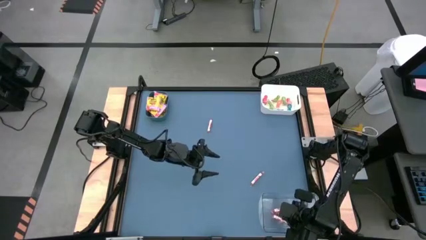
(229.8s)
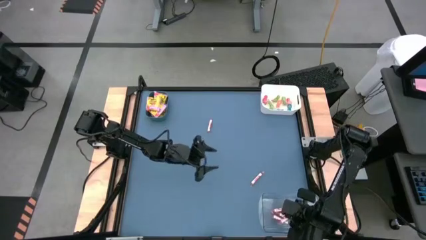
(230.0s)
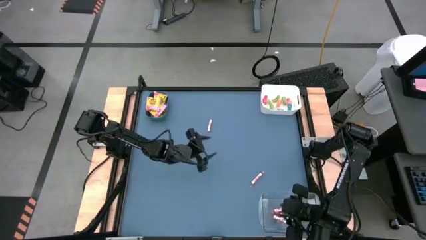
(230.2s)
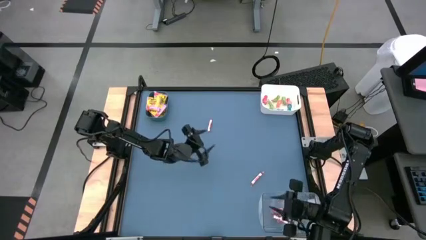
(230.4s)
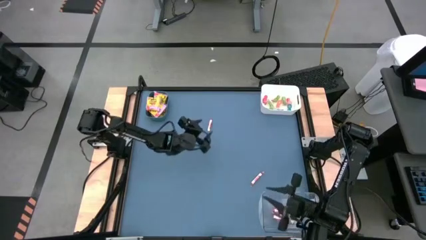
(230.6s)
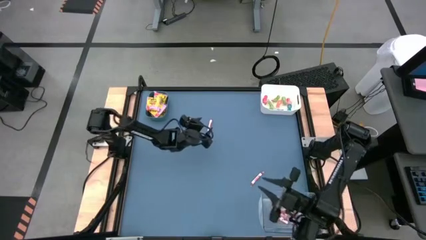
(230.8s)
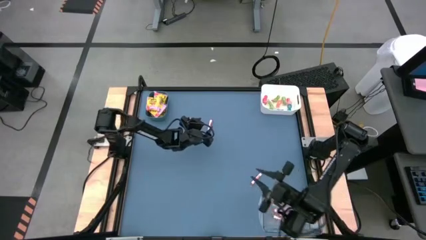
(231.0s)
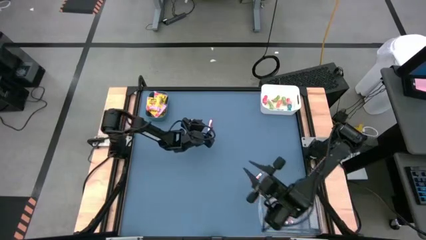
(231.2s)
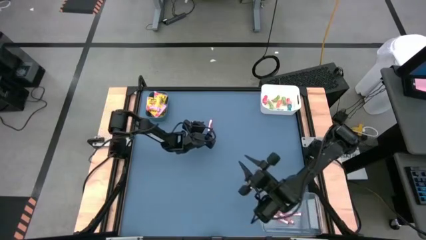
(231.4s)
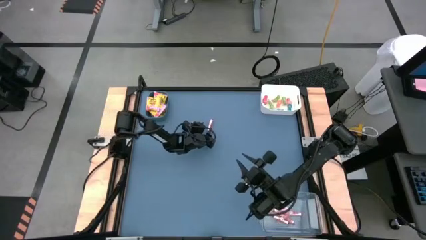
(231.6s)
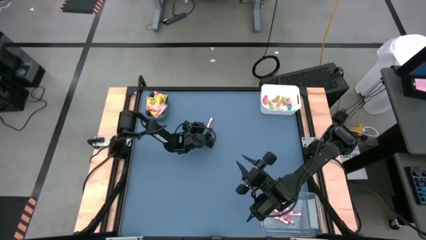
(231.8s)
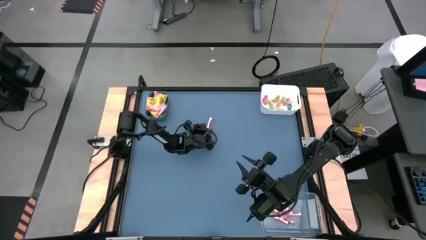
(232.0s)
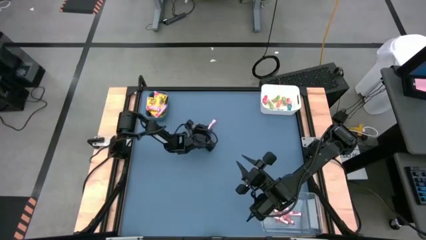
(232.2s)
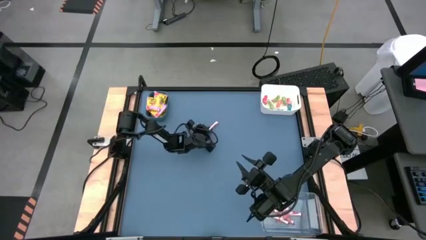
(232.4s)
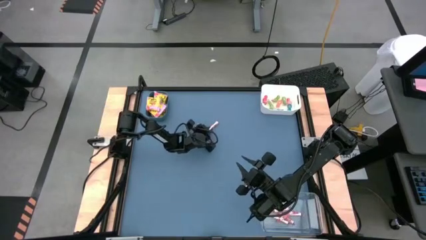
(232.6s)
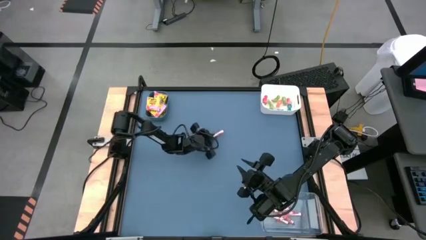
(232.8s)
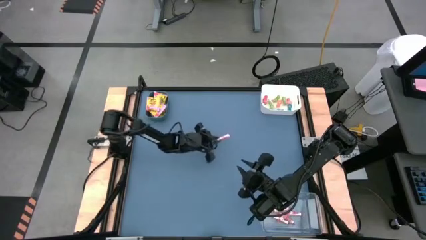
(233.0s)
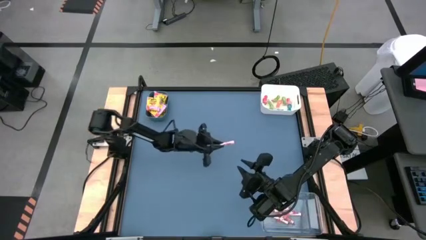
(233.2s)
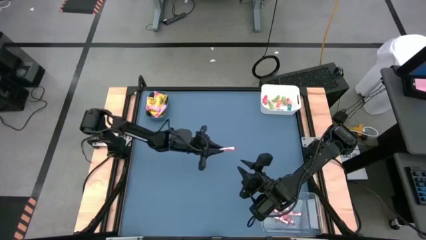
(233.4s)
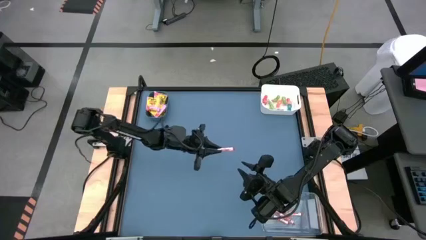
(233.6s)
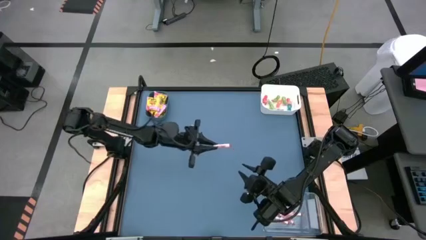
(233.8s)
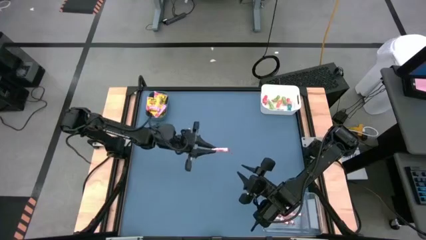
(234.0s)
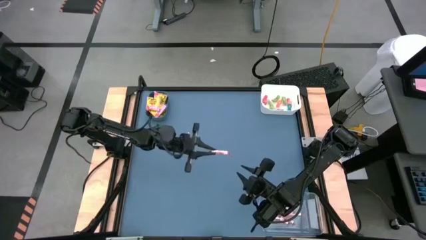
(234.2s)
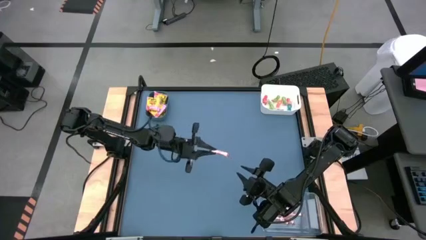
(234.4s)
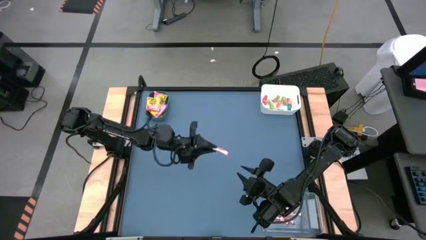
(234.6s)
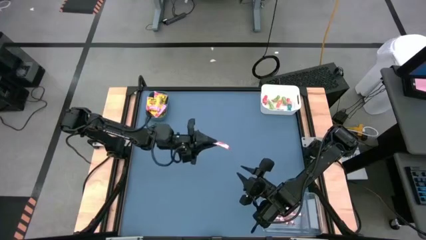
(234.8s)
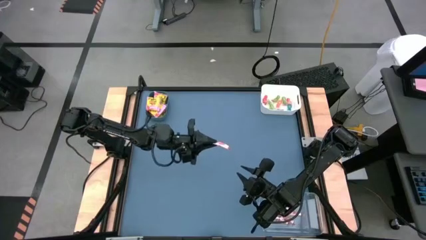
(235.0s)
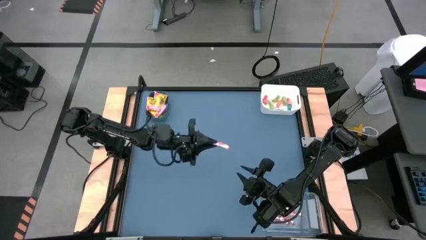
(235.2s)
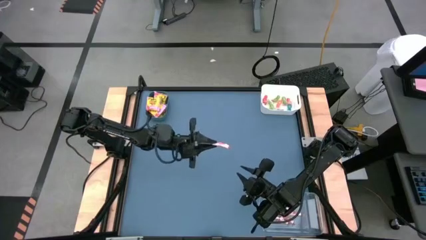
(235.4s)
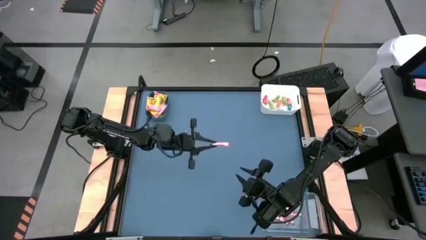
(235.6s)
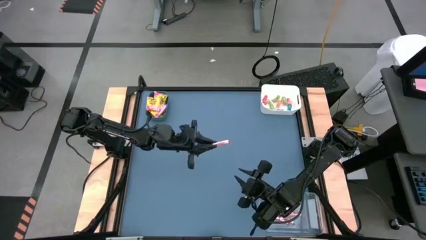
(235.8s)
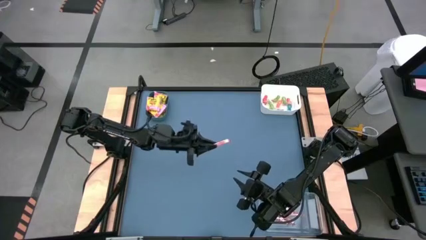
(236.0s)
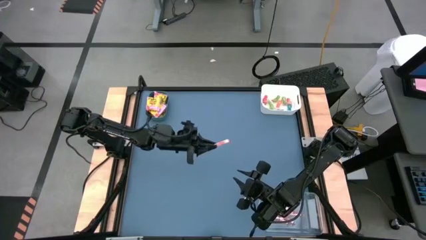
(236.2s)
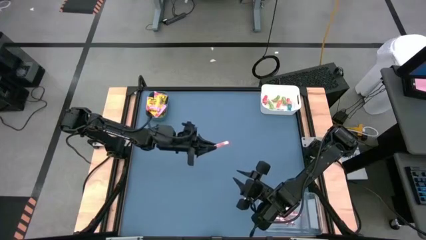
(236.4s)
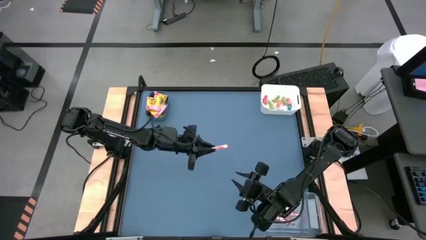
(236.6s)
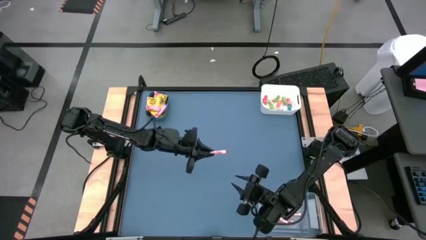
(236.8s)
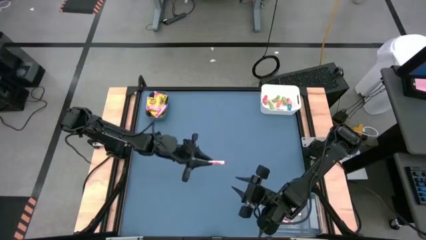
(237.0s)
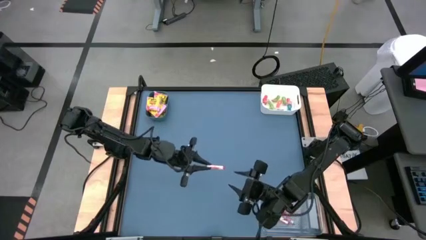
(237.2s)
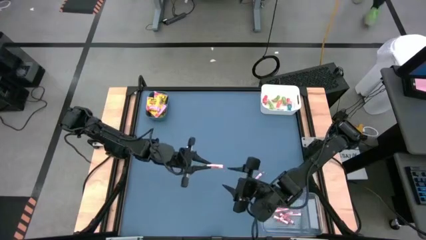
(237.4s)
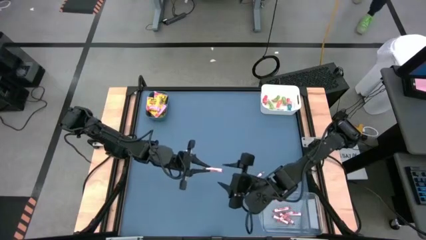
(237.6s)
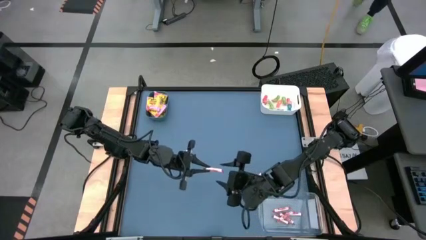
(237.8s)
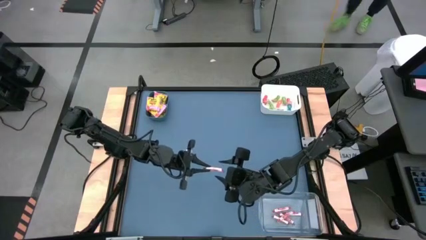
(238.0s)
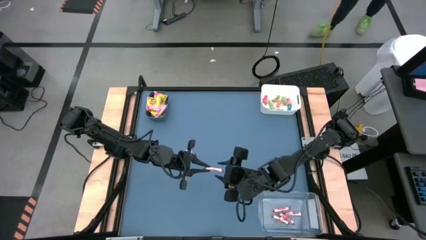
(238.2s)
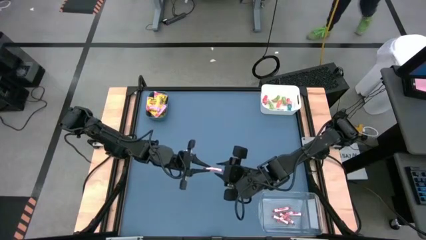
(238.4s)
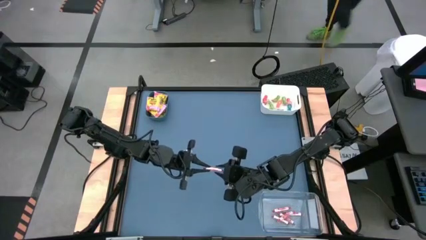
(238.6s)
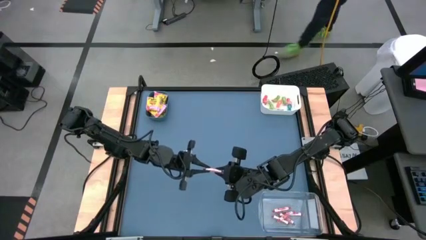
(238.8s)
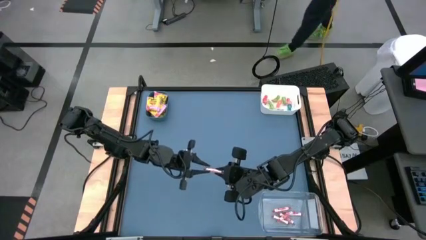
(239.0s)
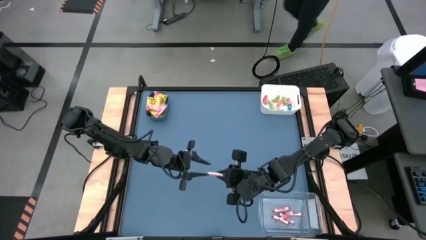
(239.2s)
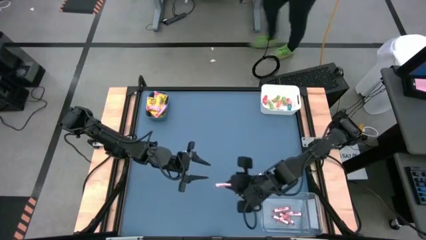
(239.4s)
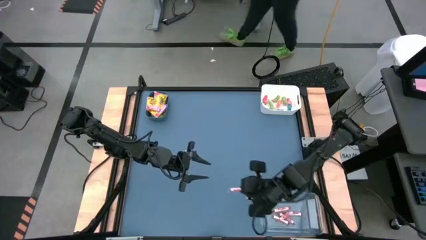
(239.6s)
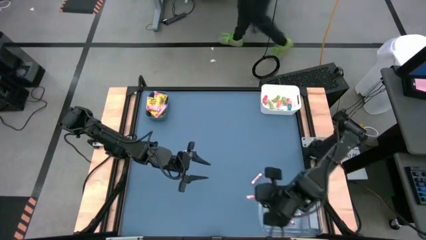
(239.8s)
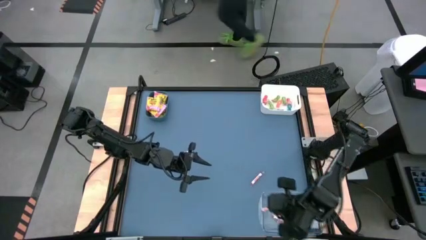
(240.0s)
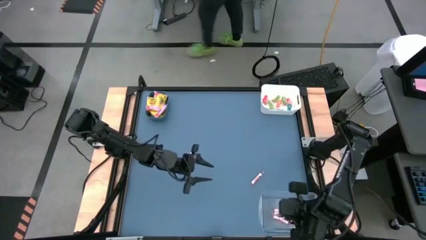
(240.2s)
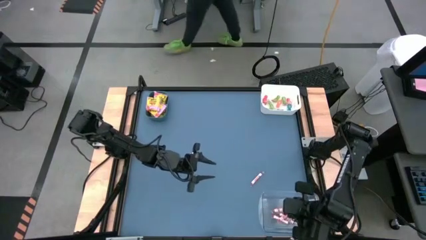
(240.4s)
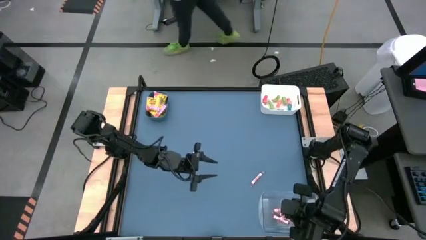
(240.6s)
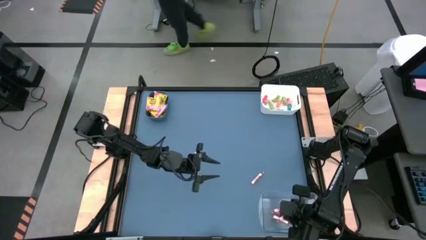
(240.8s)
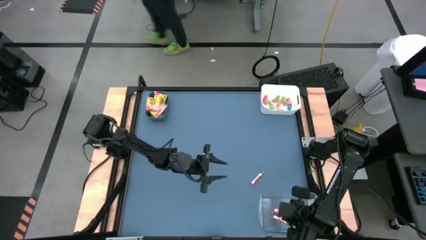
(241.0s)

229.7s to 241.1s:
Task: Sort candy
Put the white candy into the transparent bin
